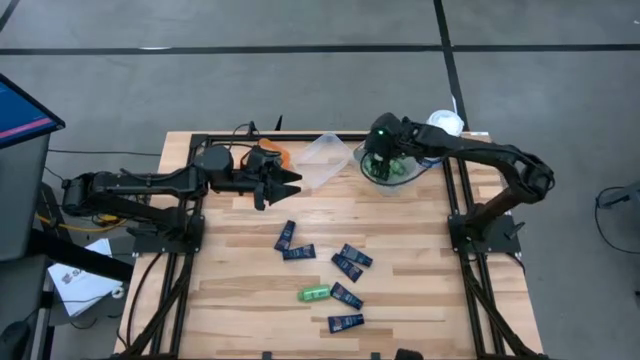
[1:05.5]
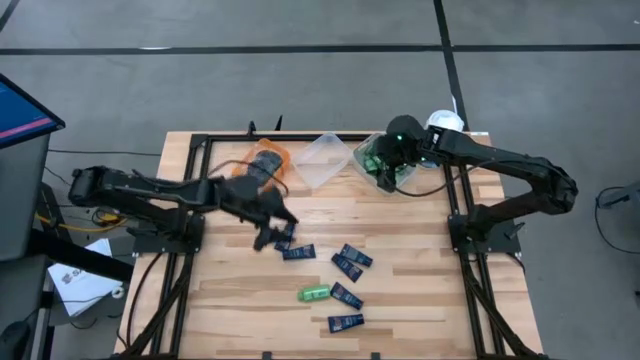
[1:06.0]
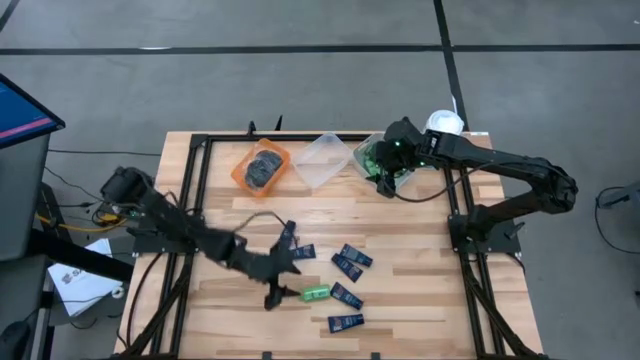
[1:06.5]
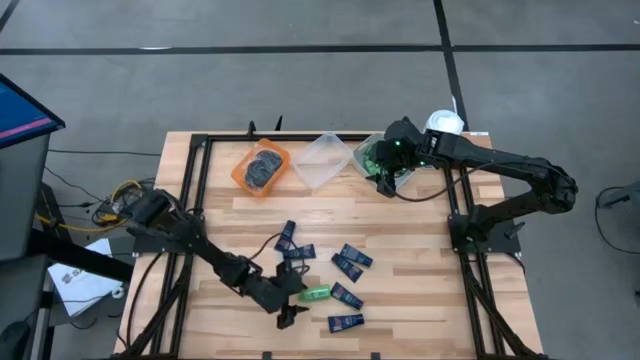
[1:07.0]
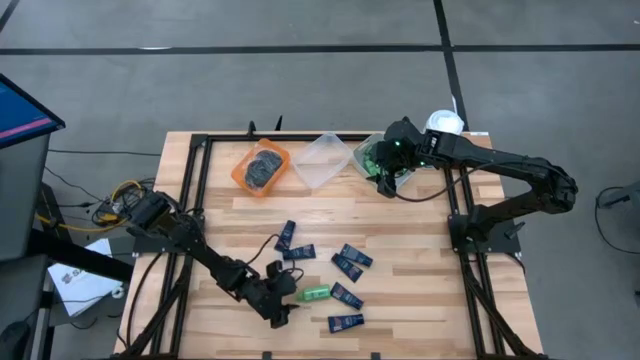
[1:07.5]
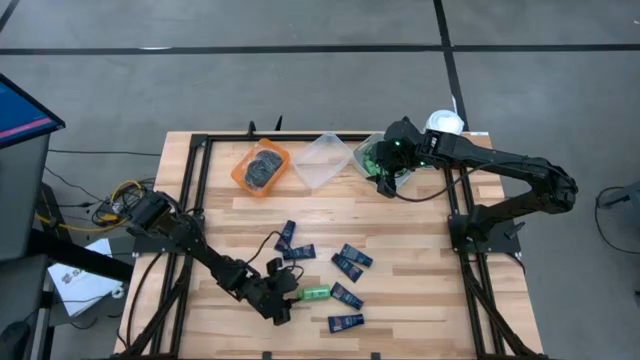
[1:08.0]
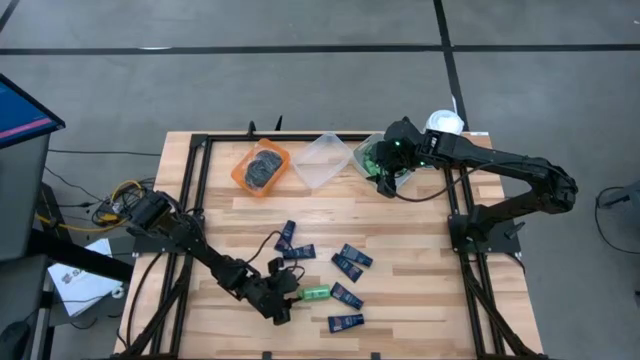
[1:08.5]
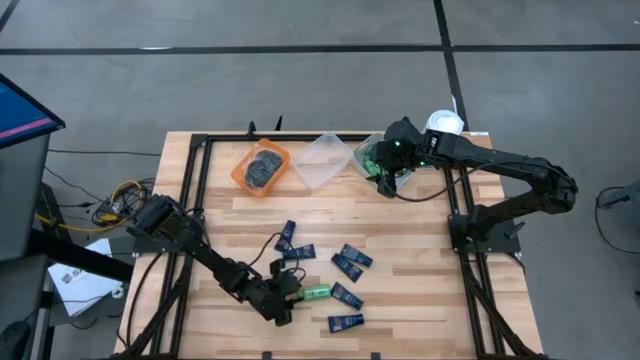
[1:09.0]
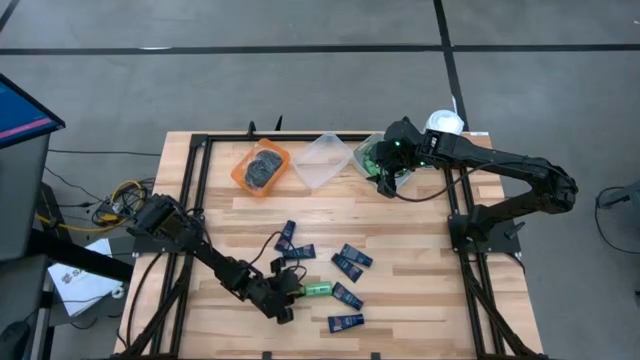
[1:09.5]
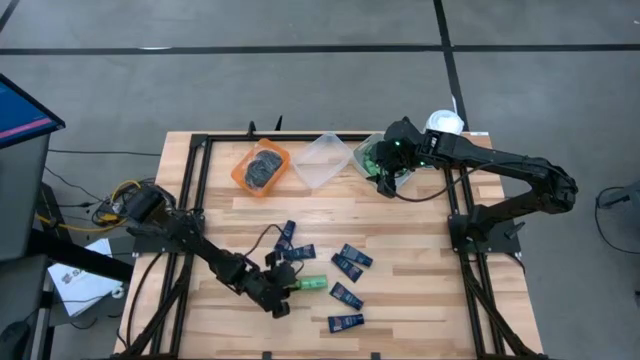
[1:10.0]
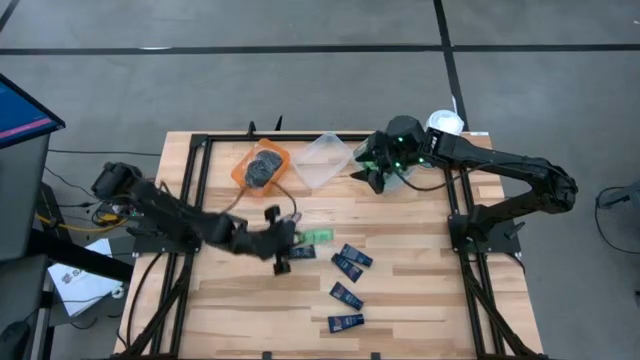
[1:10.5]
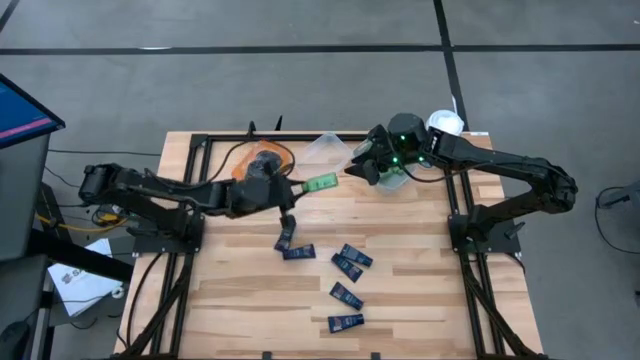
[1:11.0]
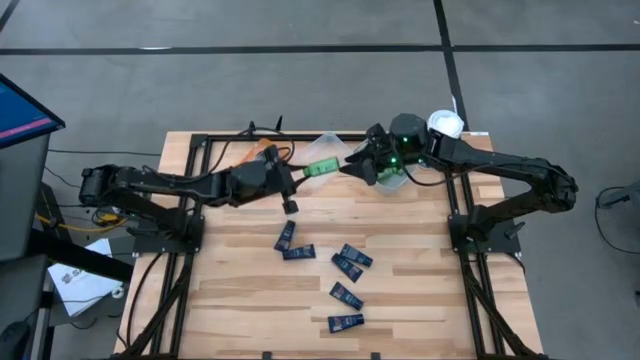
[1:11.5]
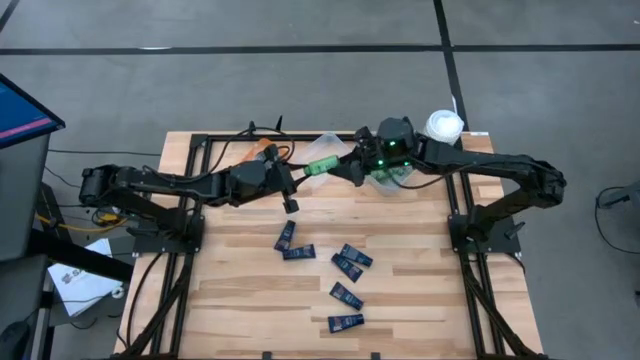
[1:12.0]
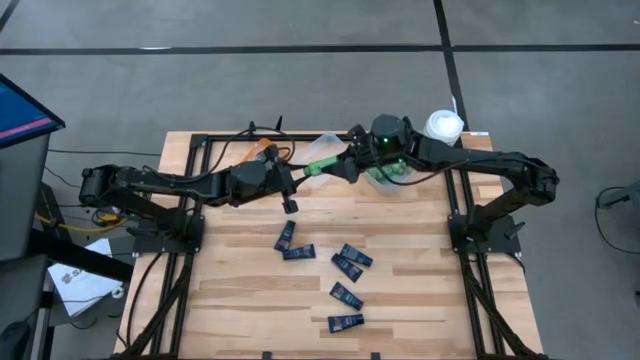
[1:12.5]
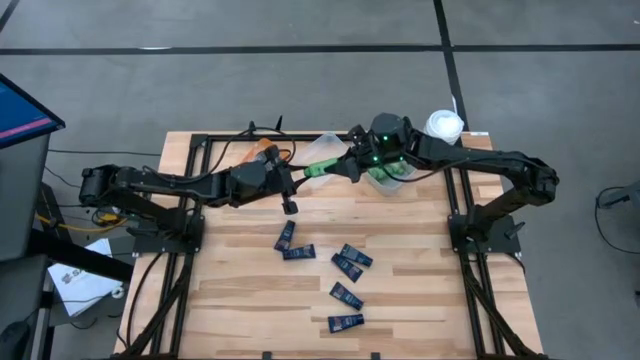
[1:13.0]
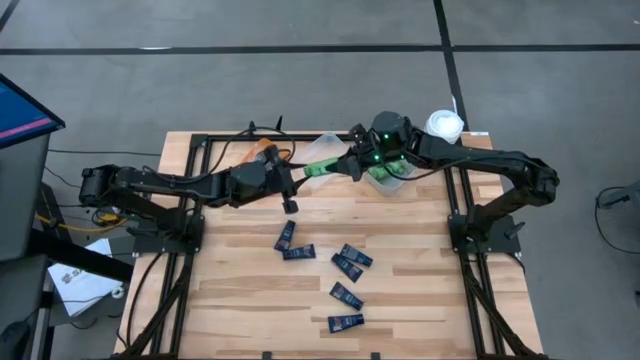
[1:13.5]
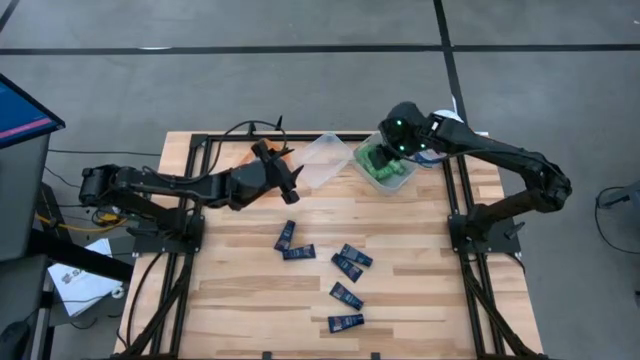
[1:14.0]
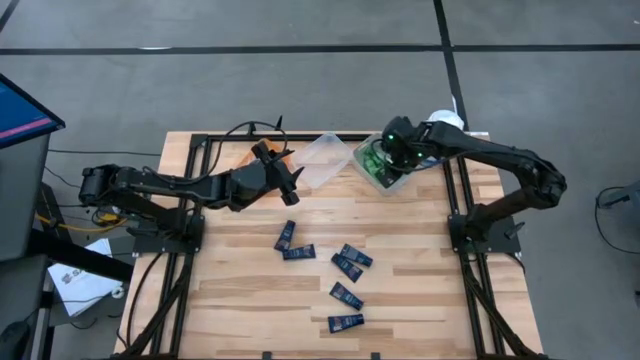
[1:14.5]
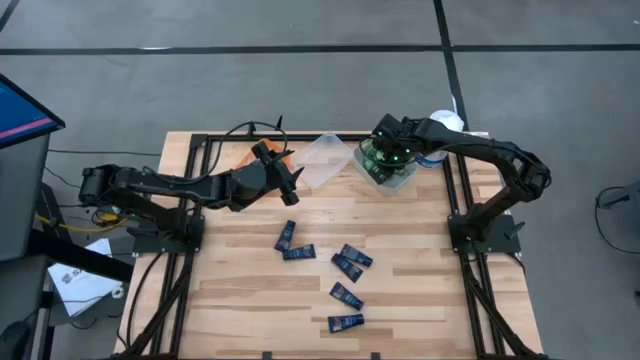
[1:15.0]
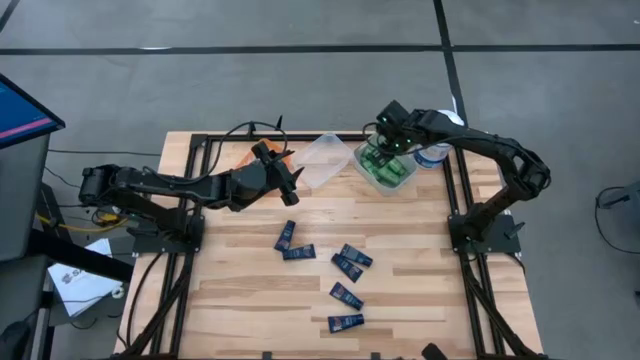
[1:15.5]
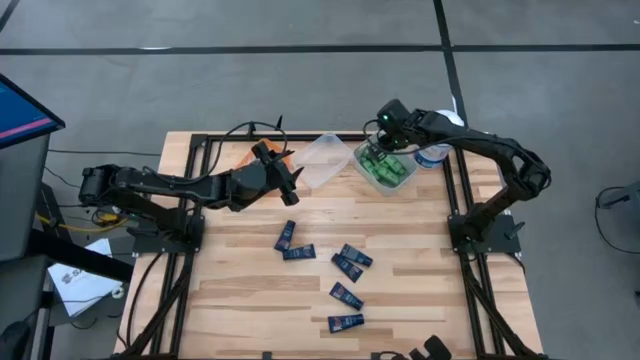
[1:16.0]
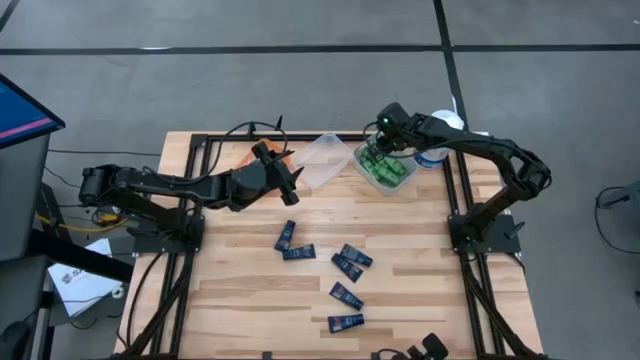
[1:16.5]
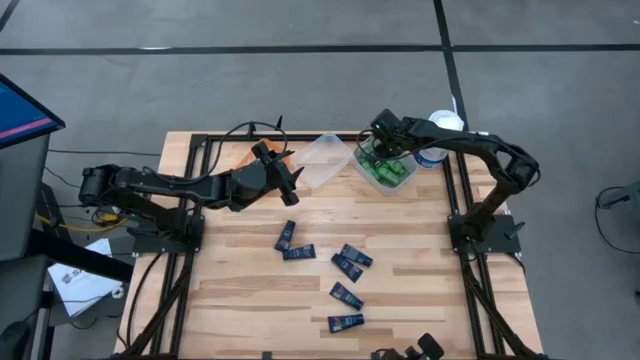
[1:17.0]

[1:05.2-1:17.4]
Task: Pick & Place Travel size toiletries
Put the green shampoo into the gray bin

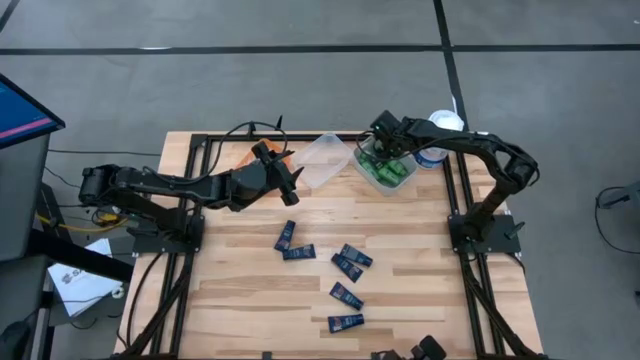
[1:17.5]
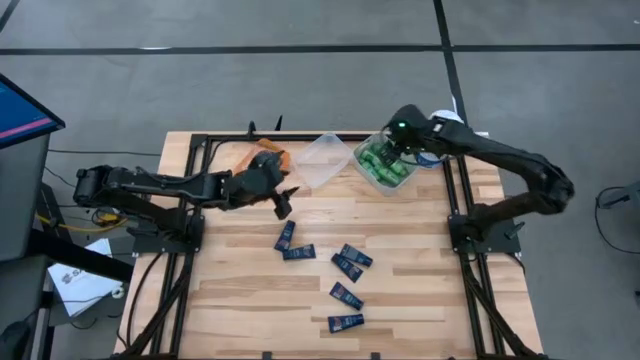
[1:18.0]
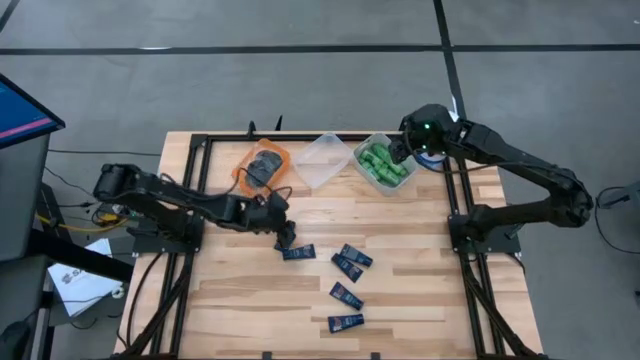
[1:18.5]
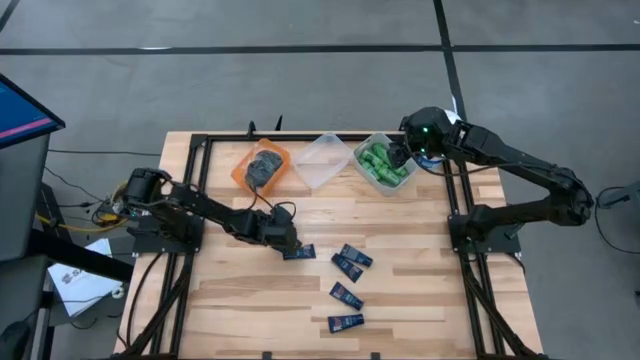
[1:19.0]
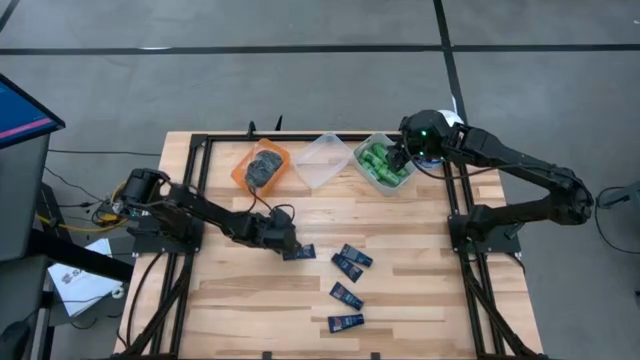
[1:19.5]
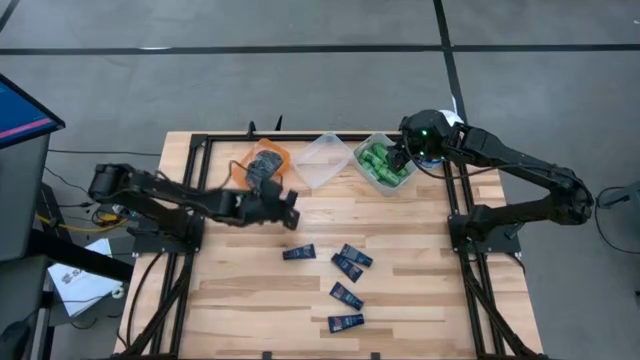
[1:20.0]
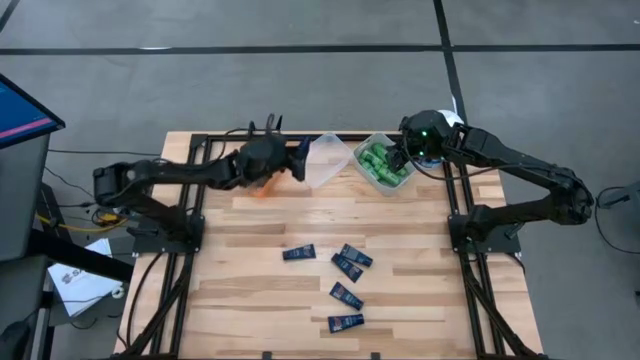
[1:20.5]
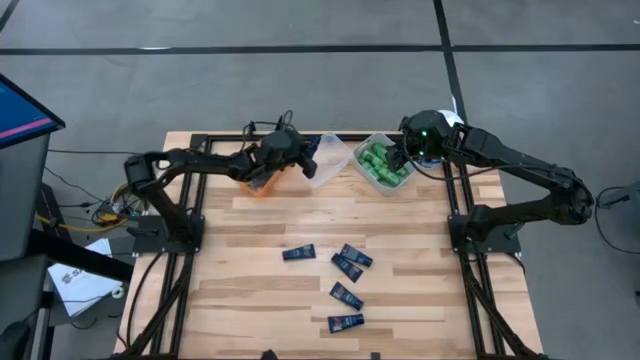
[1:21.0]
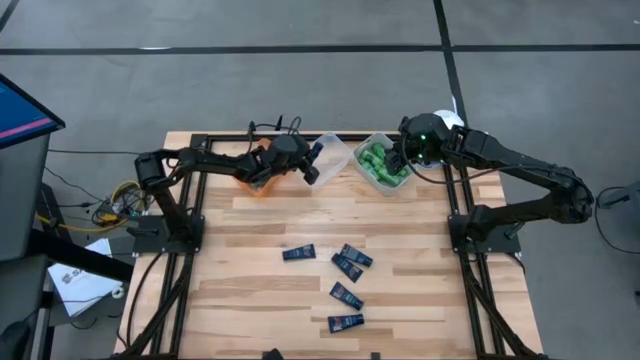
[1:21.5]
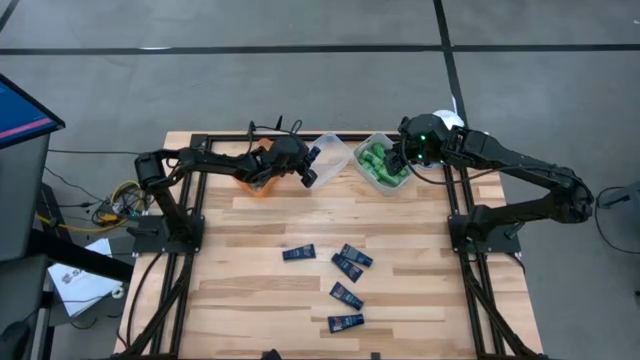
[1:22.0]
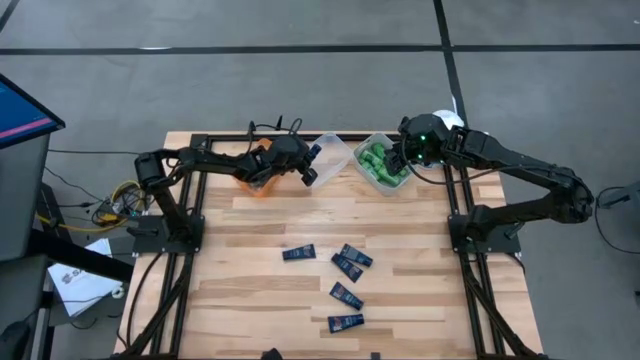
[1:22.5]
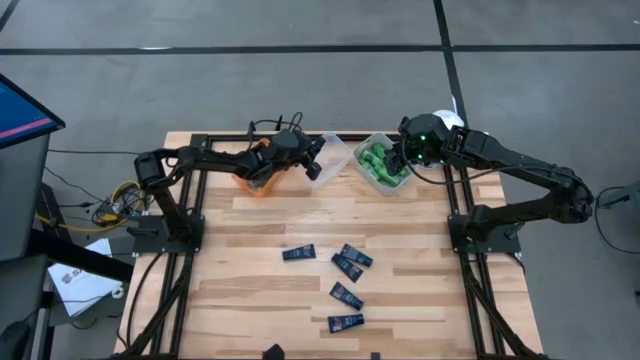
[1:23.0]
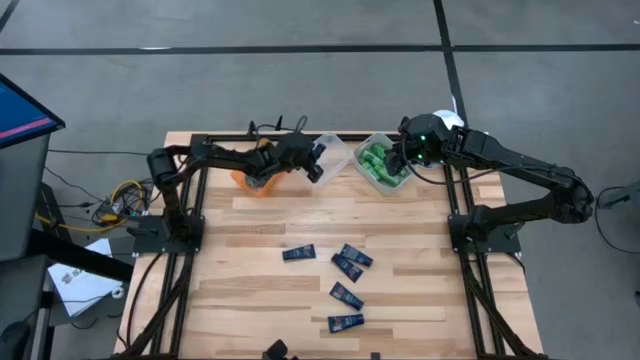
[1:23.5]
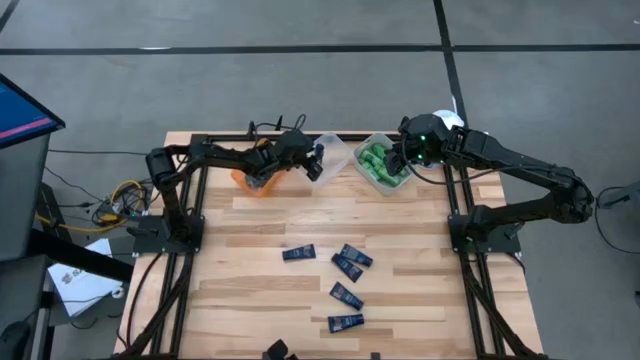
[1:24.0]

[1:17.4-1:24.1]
Put the dark blue shave cream into the transparent bin

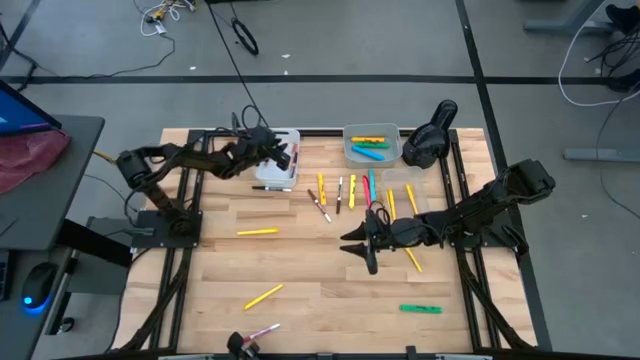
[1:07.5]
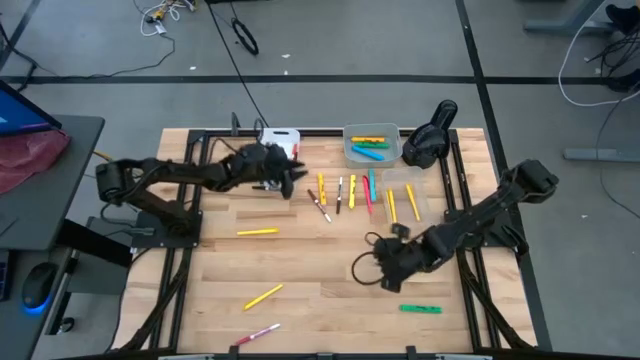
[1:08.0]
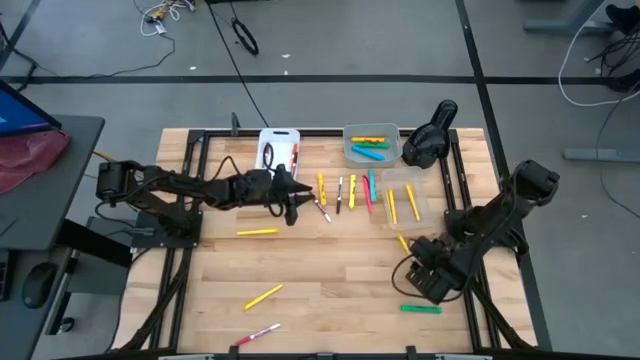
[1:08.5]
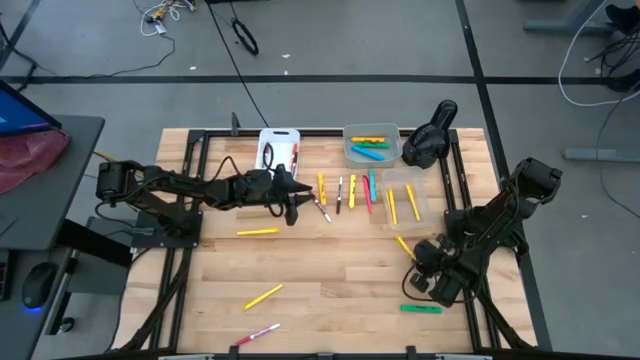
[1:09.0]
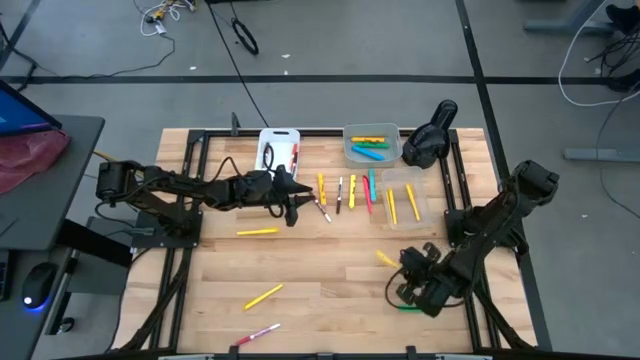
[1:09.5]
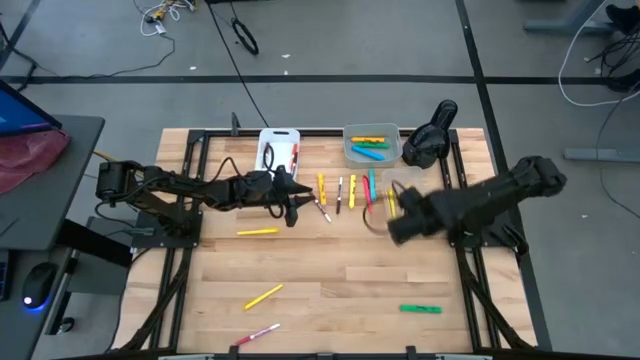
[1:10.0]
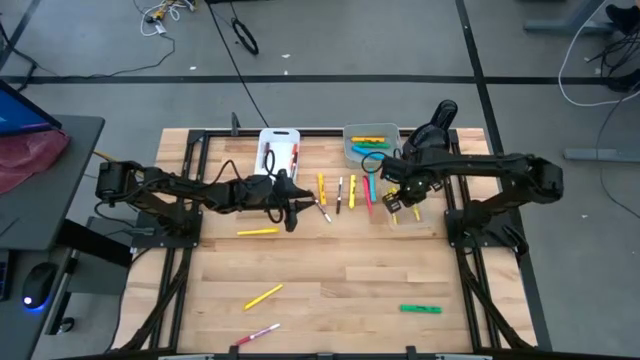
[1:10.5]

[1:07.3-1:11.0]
Task: Pick & Place Markers
Put the yellow pen into the transparent bin
